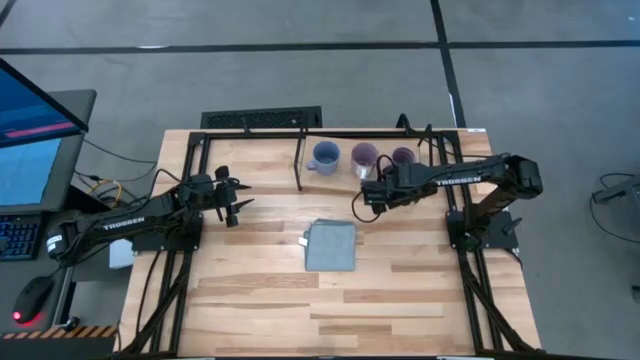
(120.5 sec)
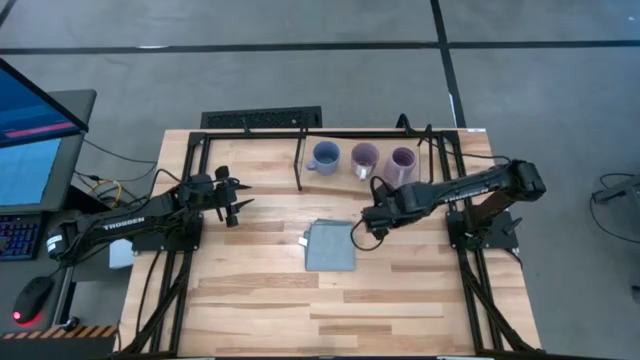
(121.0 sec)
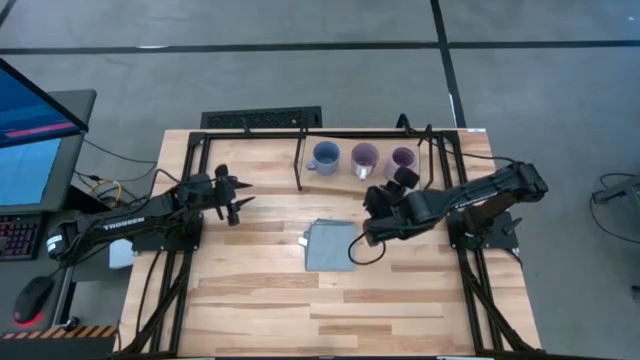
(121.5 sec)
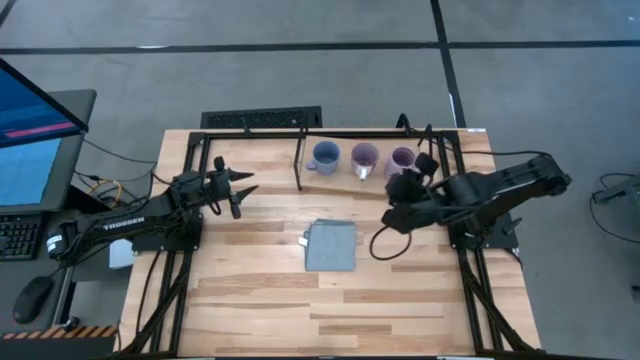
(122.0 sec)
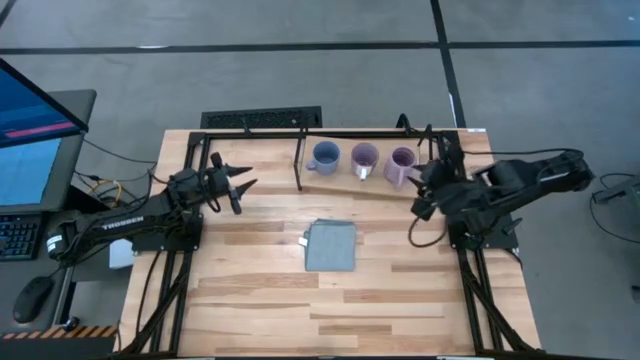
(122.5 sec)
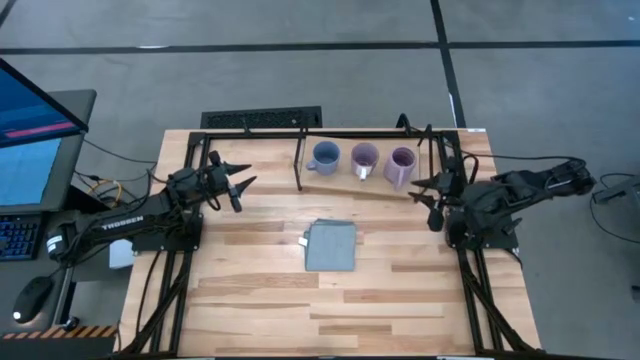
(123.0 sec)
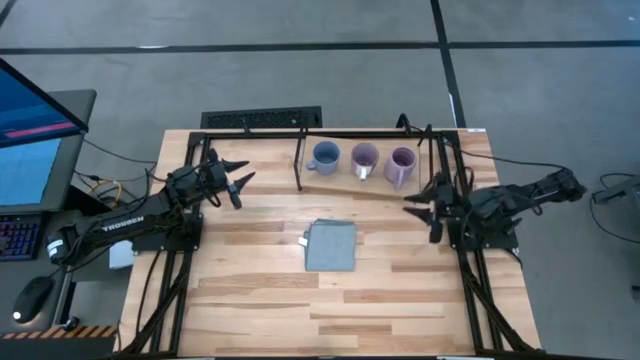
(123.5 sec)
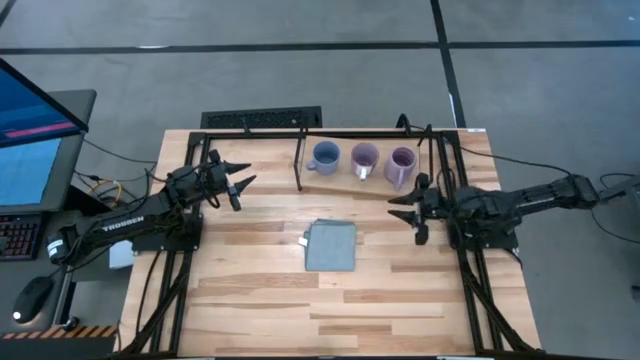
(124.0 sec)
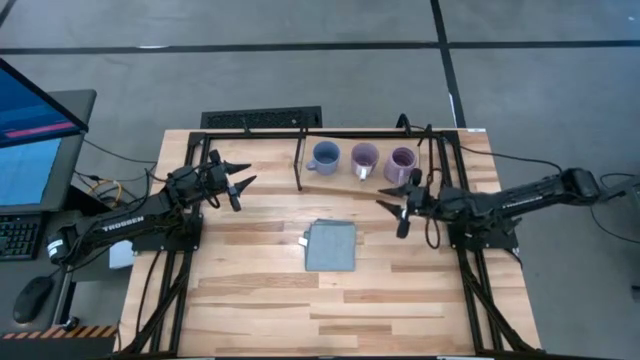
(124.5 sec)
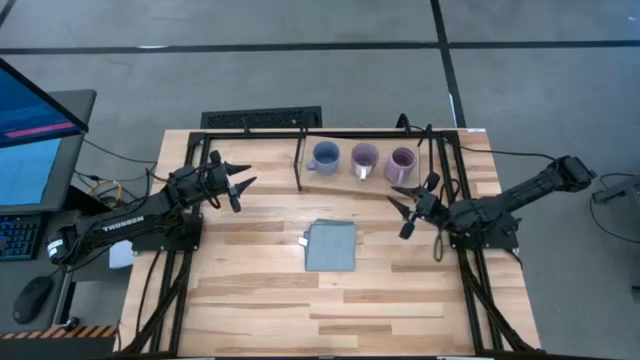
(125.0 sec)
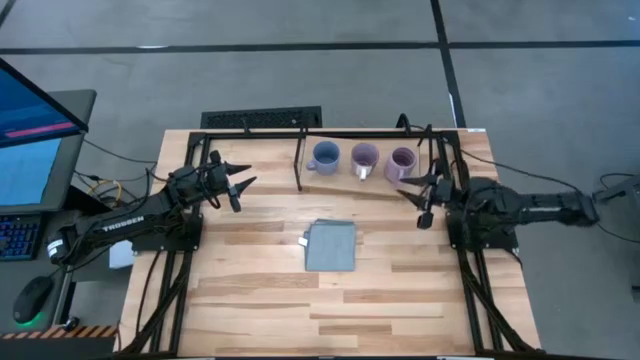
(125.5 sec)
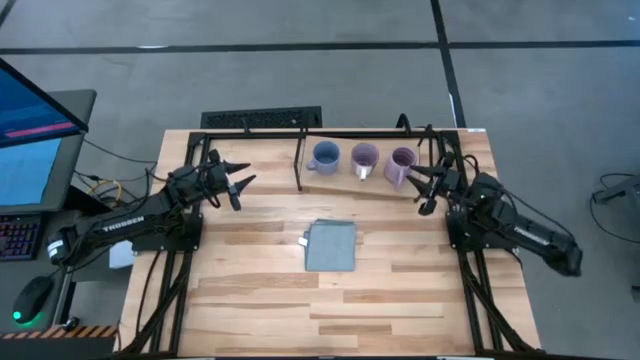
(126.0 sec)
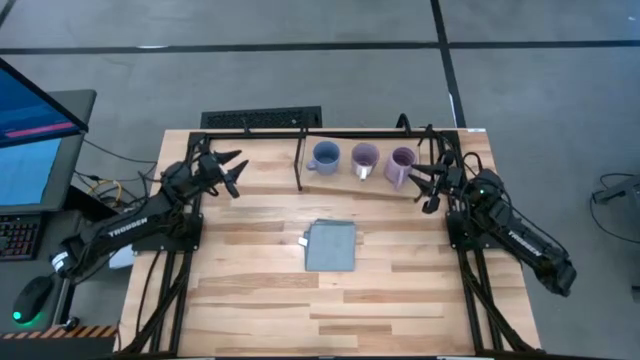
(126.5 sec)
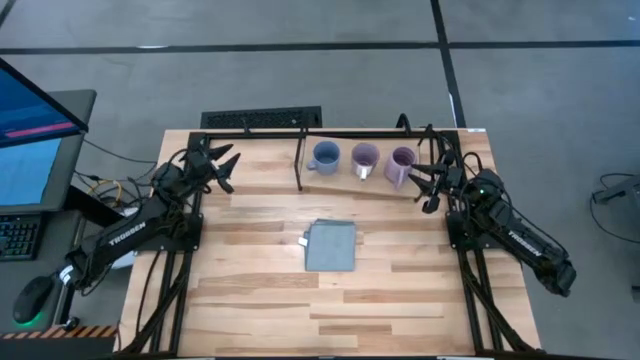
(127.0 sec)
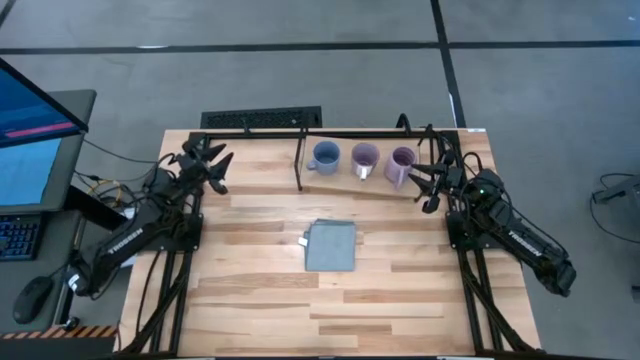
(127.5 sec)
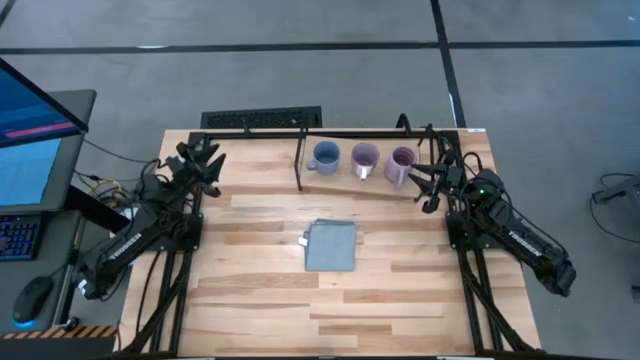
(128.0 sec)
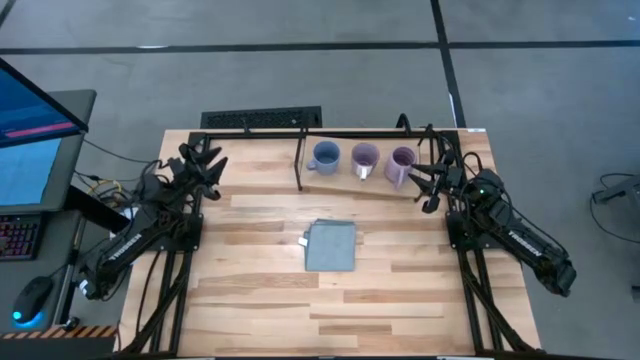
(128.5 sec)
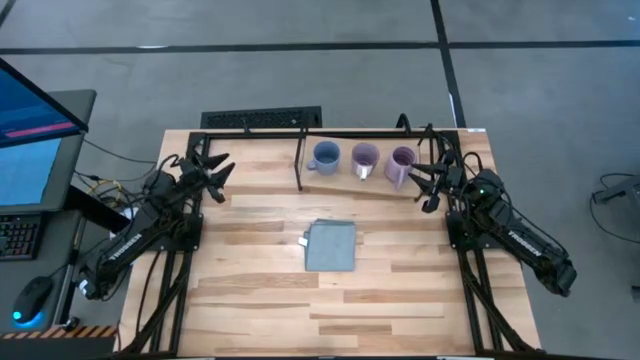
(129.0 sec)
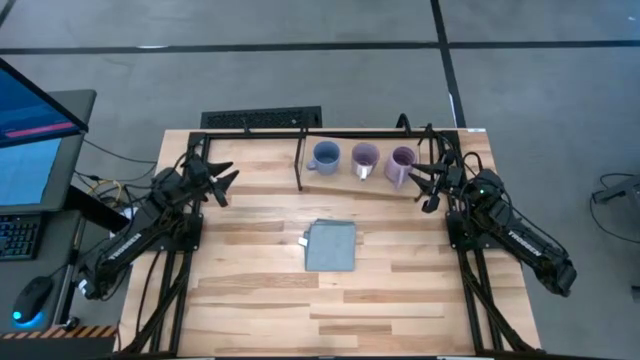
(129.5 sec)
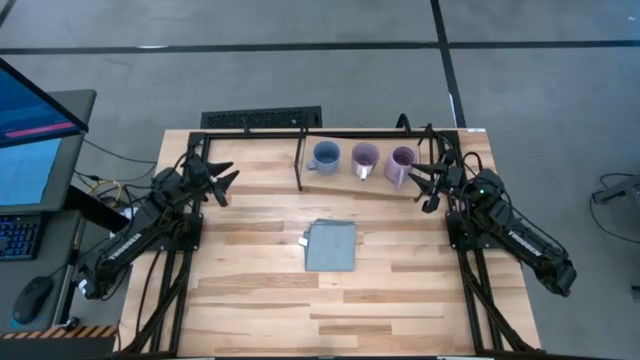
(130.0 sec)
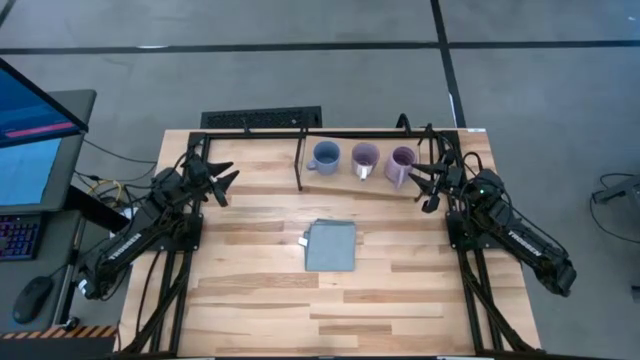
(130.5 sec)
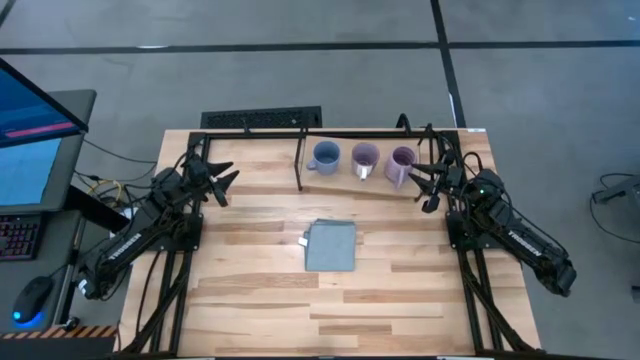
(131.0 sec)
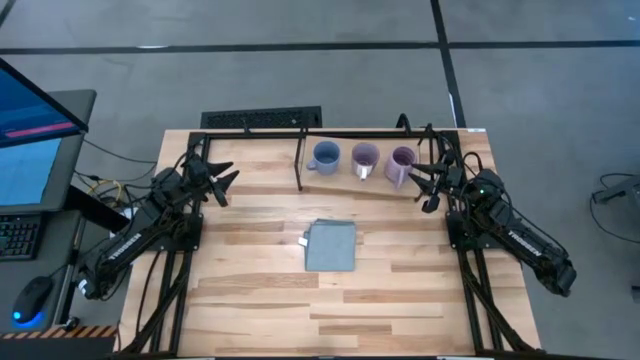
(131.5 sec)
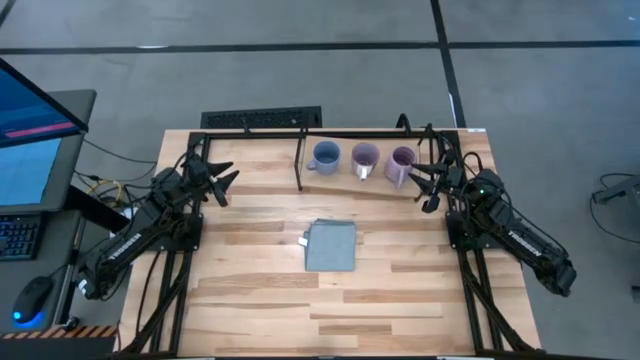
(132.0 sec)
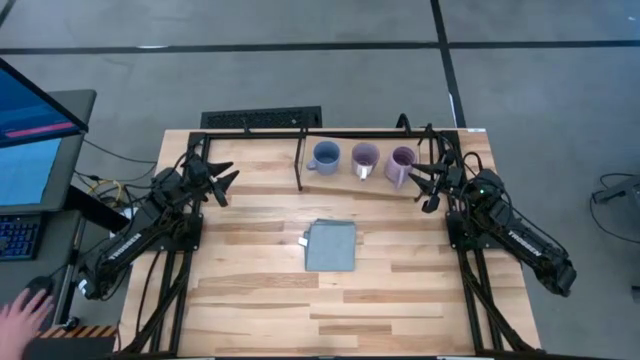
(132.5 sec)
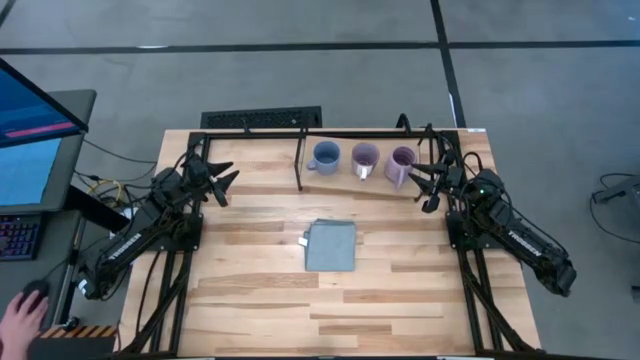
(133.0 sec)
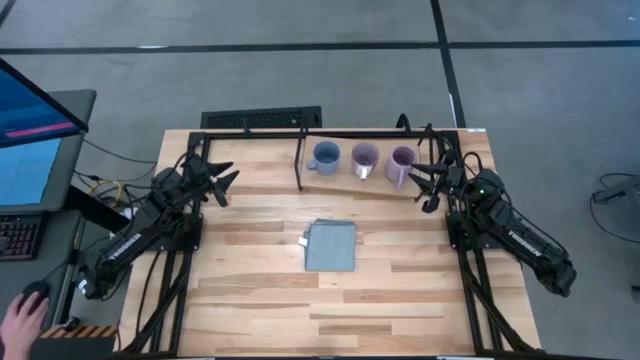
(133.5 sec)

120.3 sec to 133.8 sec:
Task: Stack small to large cups/mugs on shelf
Return to Home Position

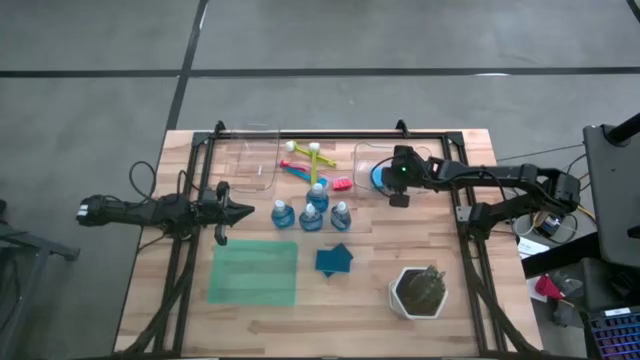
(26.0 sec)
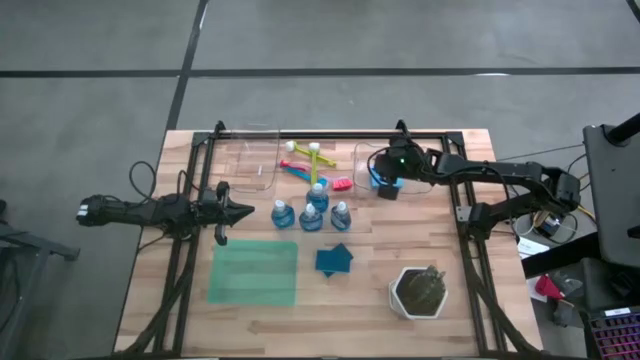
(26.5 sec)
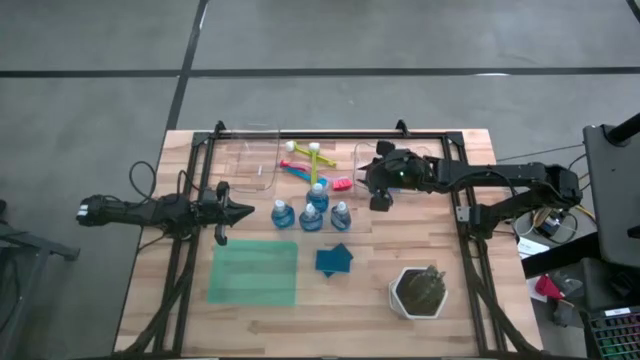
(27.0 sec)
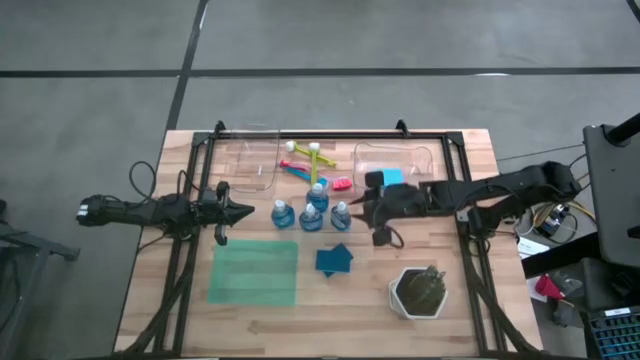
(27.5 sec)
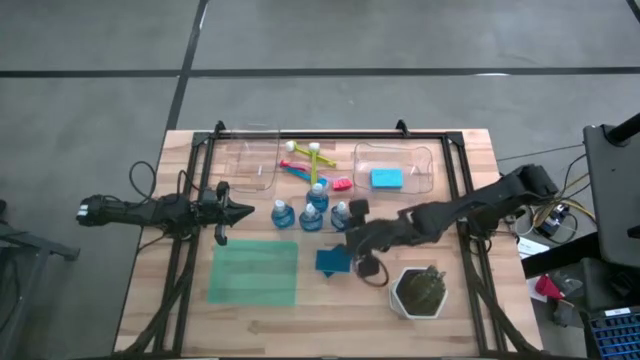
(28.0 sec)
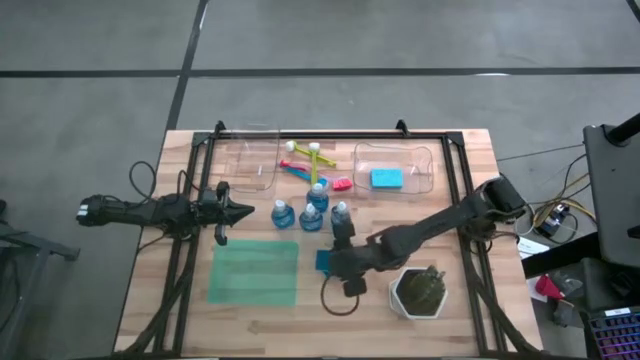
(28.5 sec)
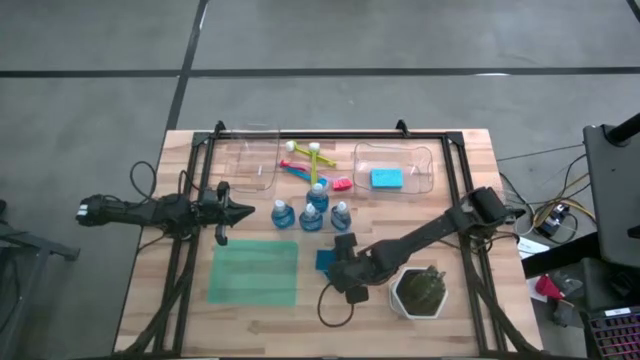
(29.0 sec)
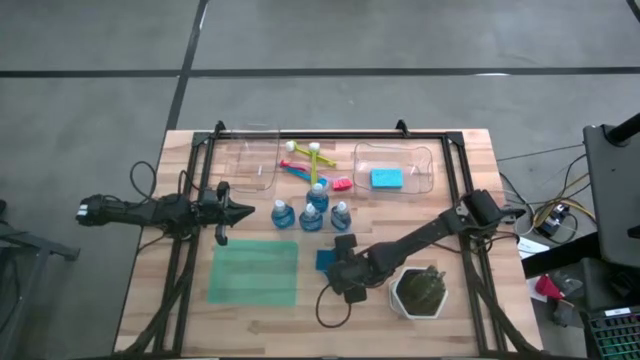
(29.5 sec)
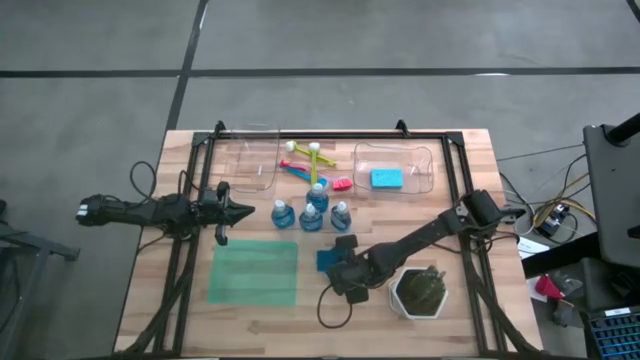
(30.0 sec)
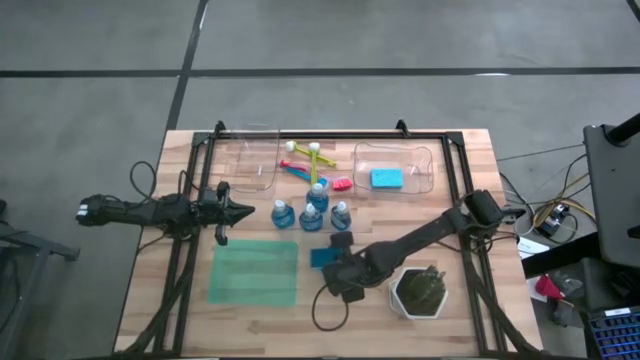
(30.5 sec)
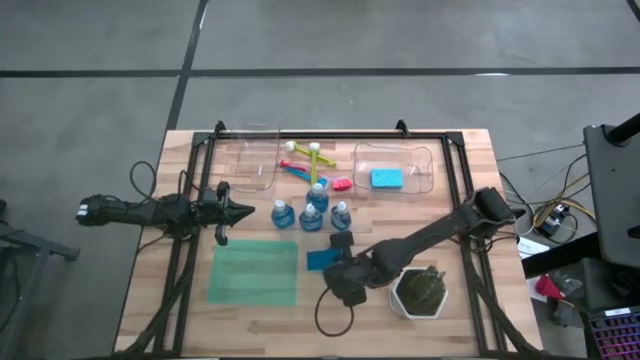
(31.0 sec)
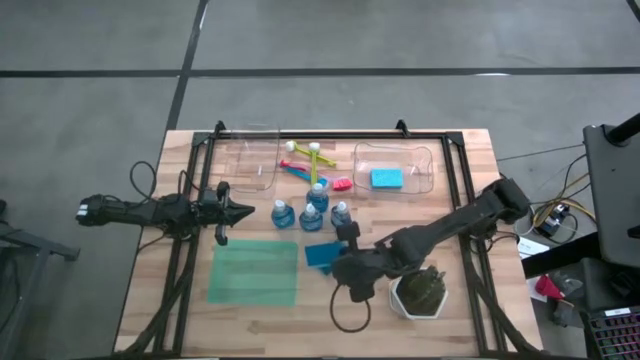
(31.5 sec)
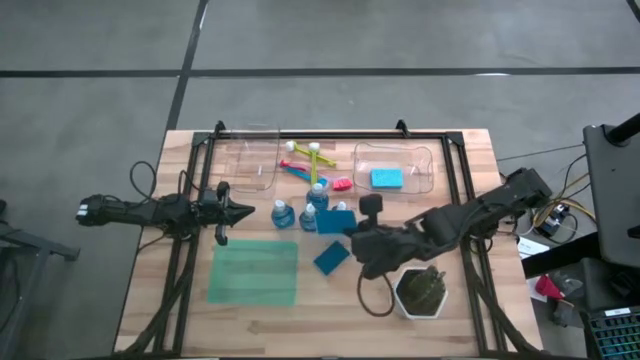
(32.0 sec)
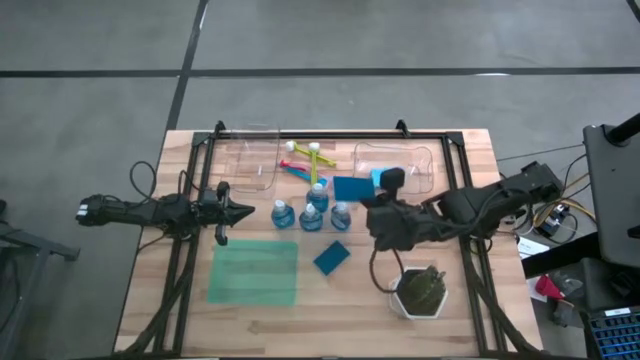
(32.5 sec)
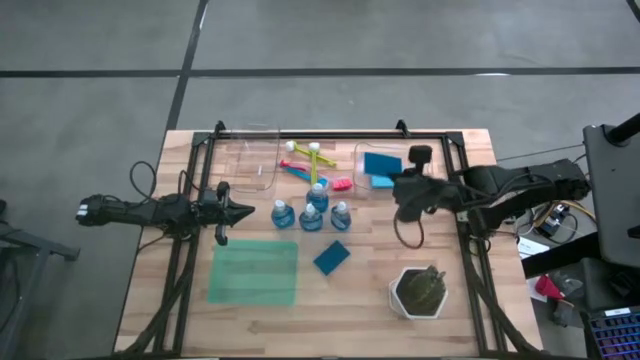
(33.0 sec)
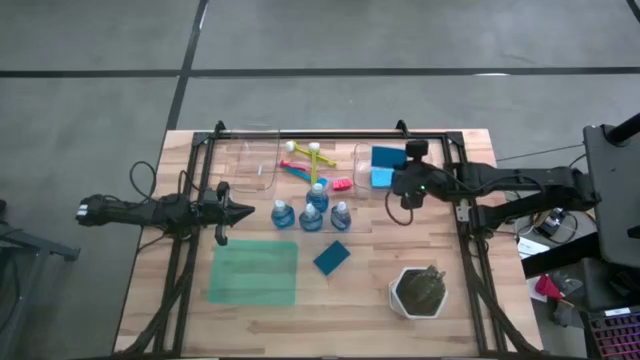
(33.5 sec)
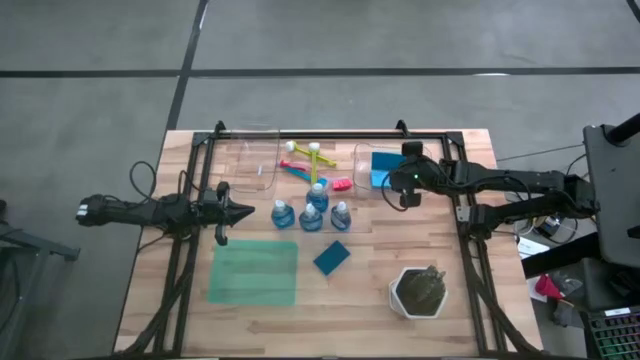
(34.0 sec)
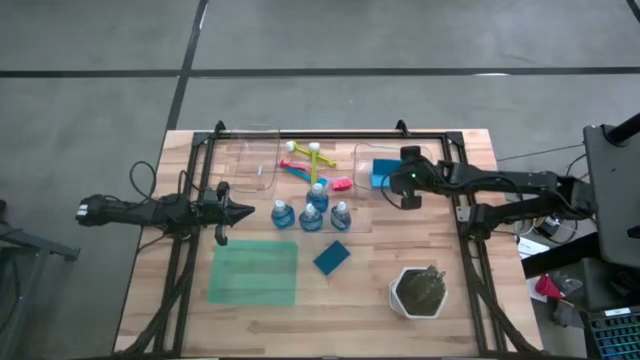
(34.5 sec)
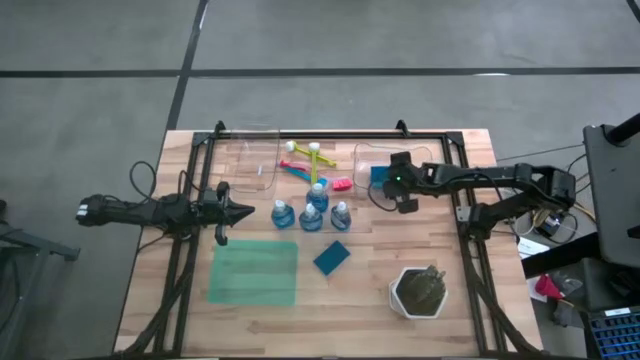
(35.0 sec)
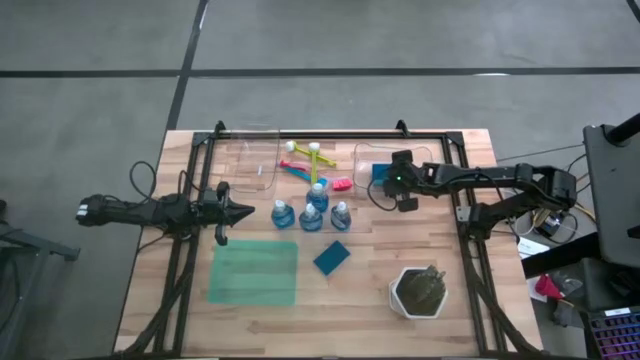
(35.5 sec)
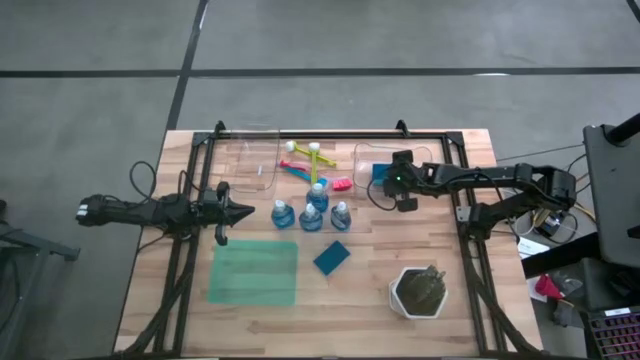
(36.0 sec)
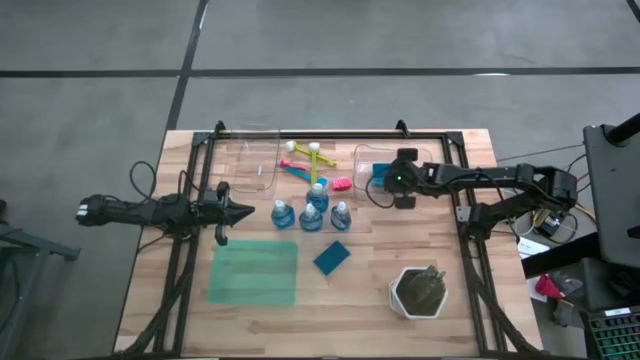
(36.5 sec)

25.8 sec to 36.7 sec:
Task: Pick & Place Kitchen Sink Supplies
Put the blue sponge into the right transparent bin
